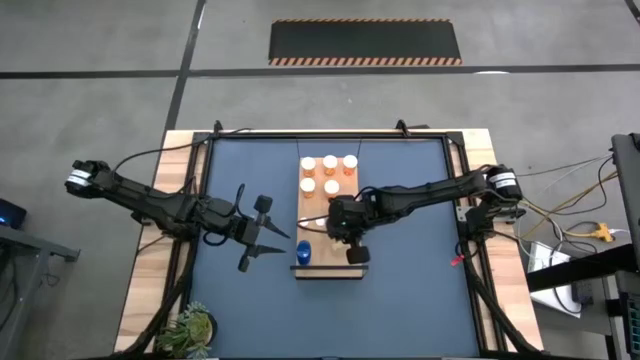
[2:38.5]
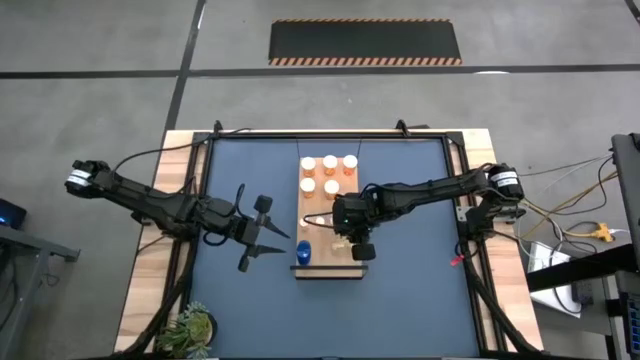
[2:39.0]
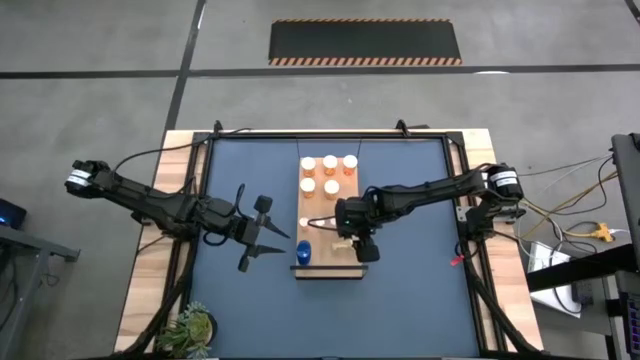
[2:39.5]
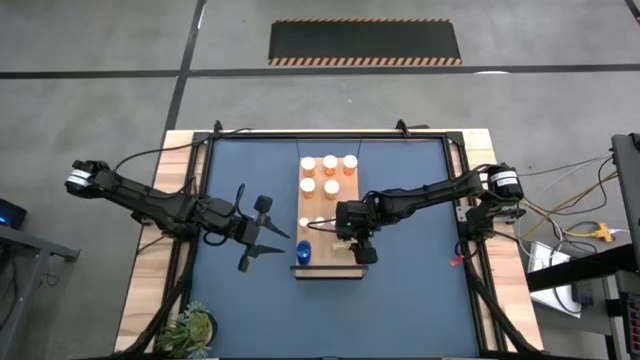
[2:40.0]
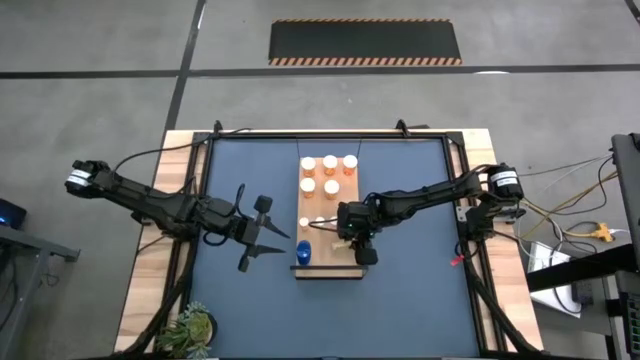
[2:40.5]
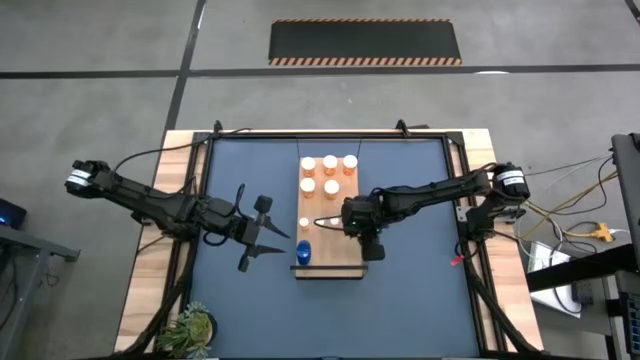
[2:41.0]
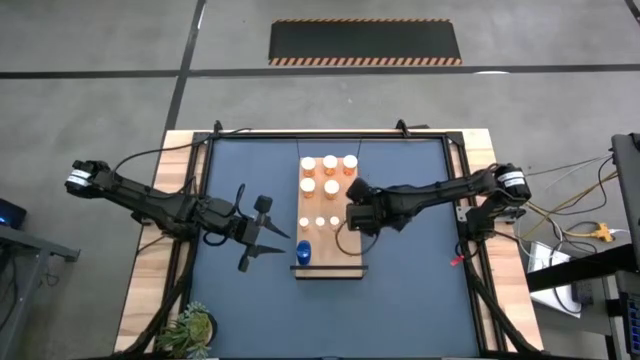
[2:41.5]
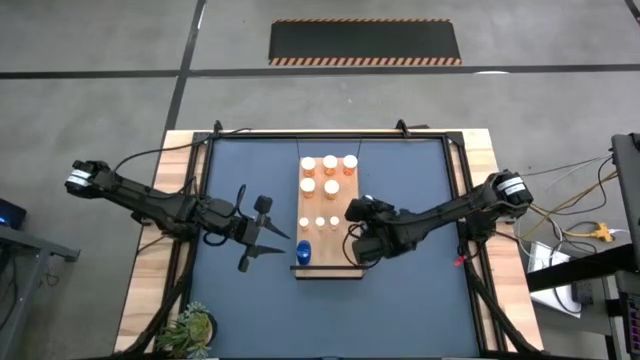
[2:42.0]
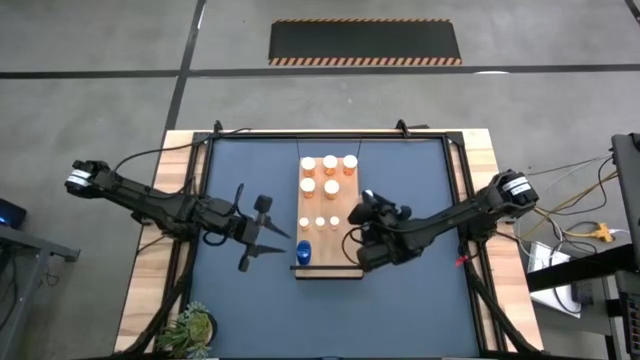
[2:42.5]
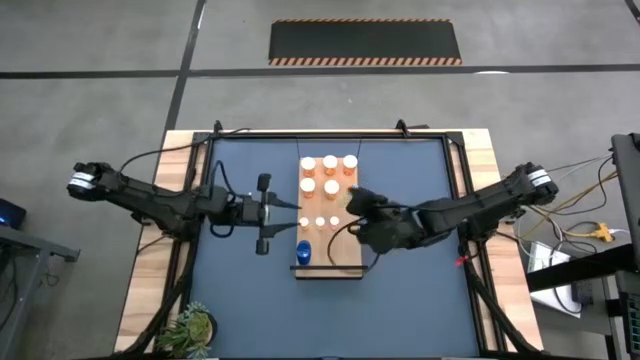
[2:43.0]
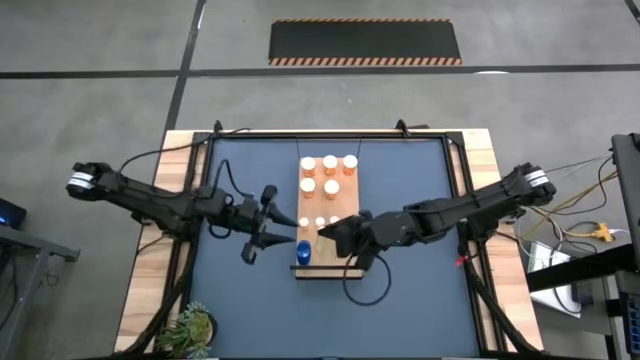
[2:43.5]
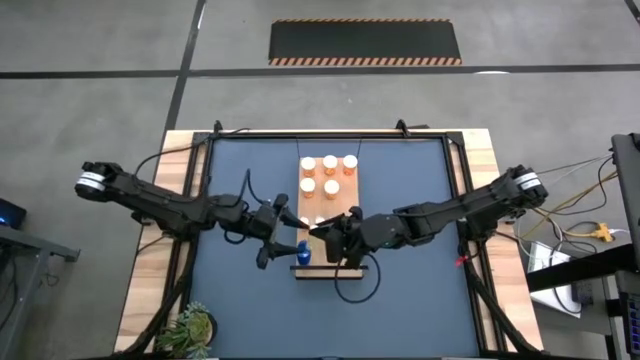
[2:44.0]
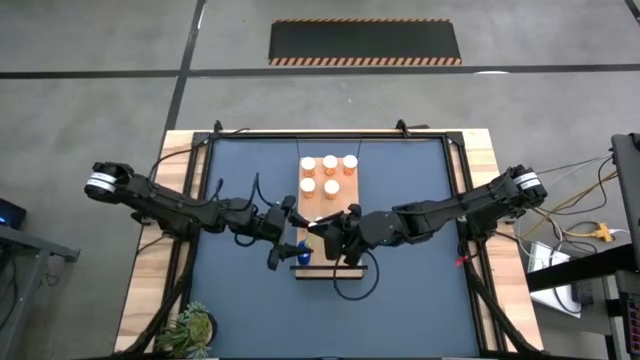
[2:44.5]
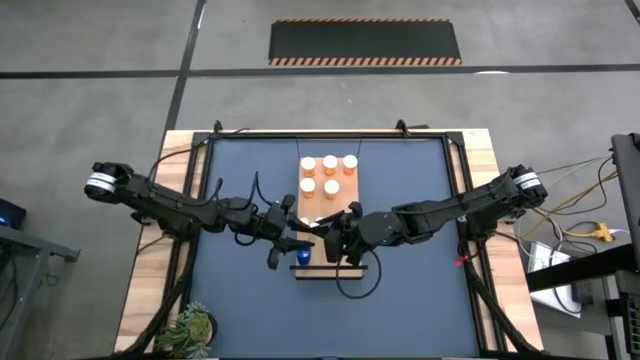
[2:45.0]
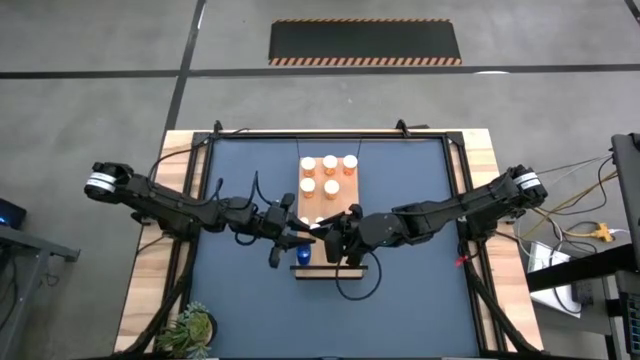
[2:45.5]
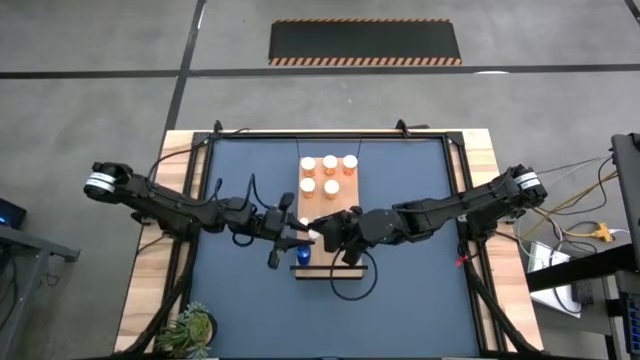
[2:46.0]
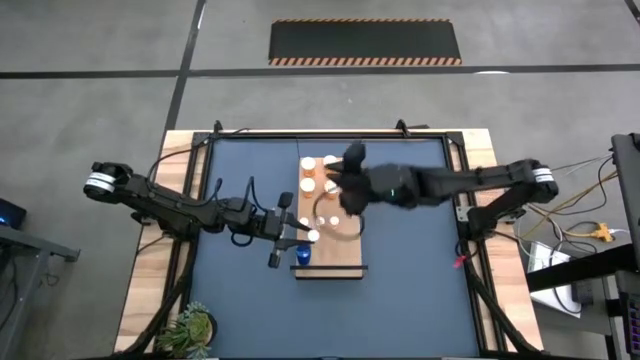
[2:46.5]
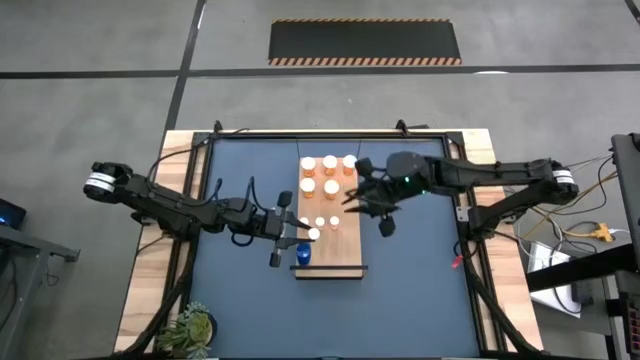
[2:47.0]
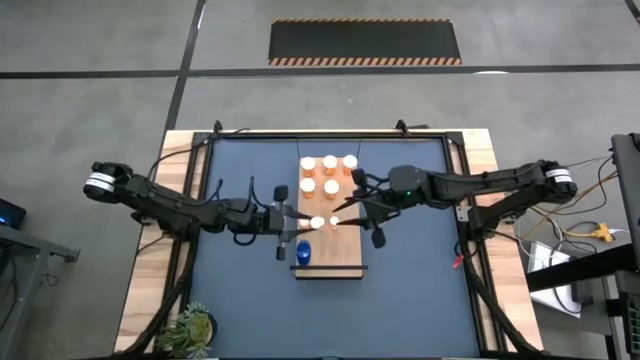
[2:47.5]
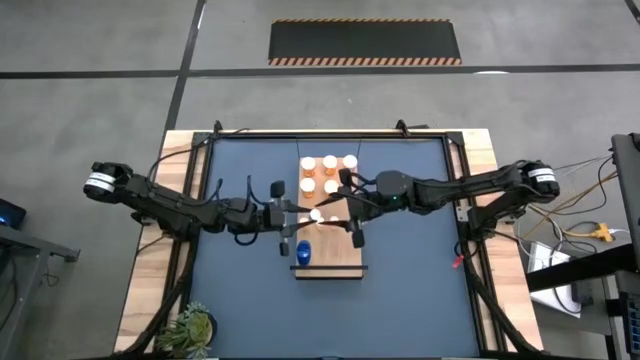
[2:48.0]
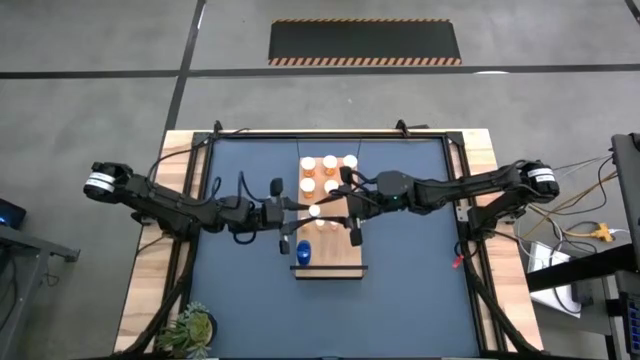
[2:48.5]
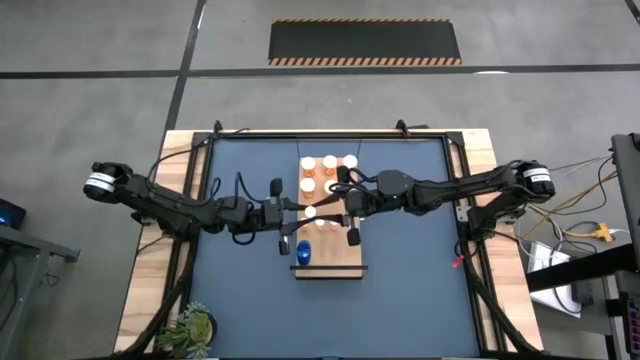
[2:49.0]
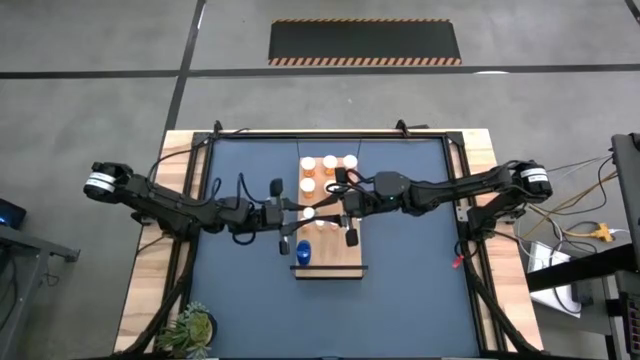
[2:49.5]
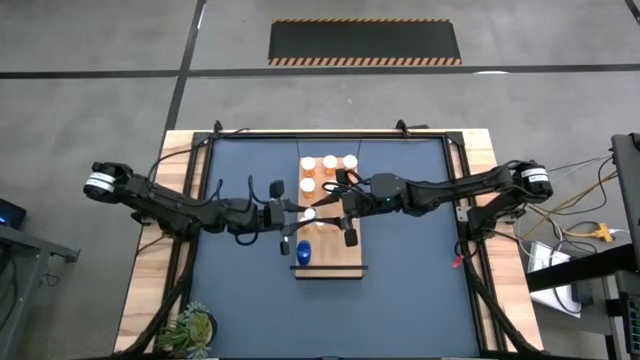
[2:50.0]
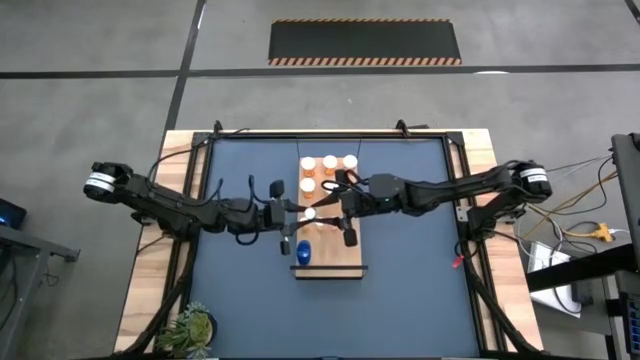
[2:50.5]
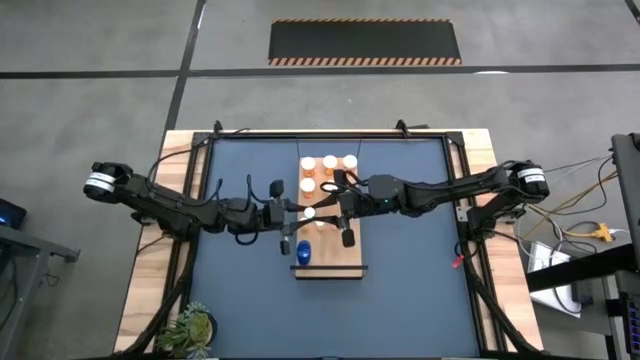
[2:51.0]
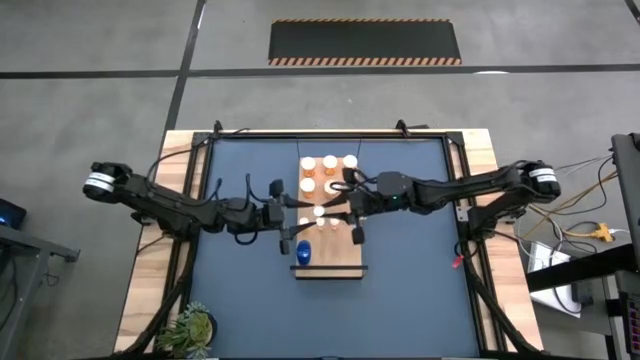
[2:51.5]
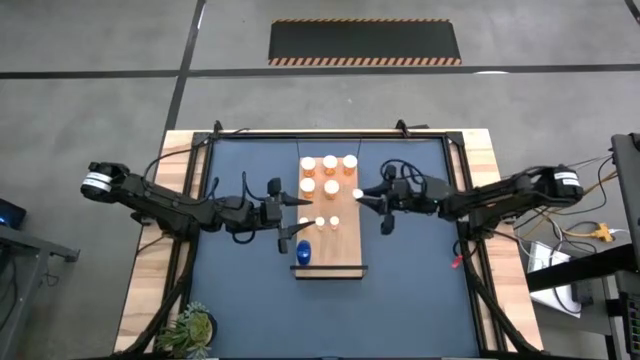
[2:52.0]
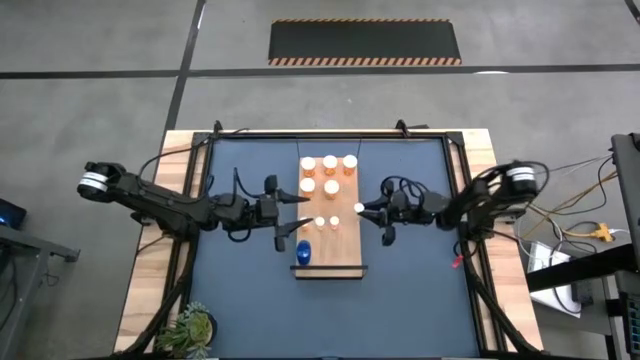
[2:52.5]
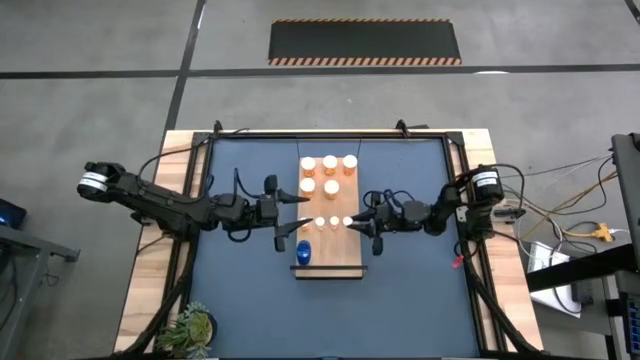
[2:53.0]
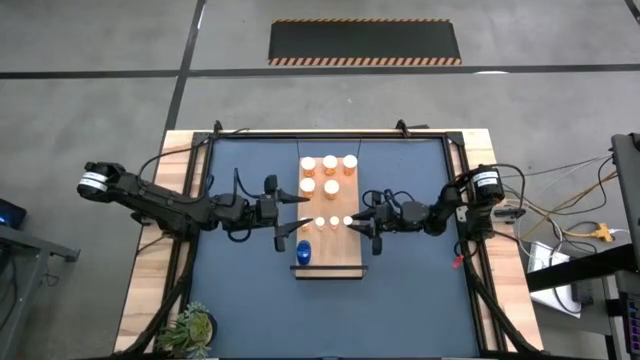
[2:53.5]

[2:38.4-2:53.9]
Task: Pick and place medicine bottles onto shelf by color
Put the small yellow pill bottle on the shelf

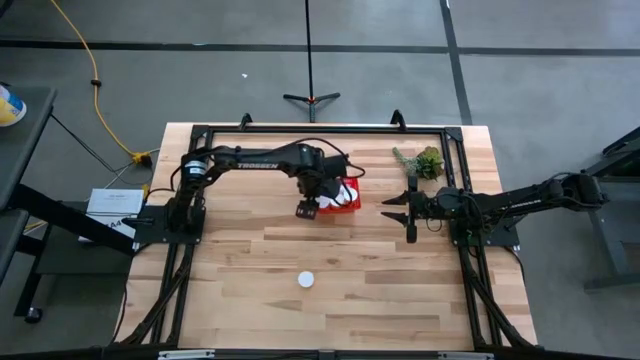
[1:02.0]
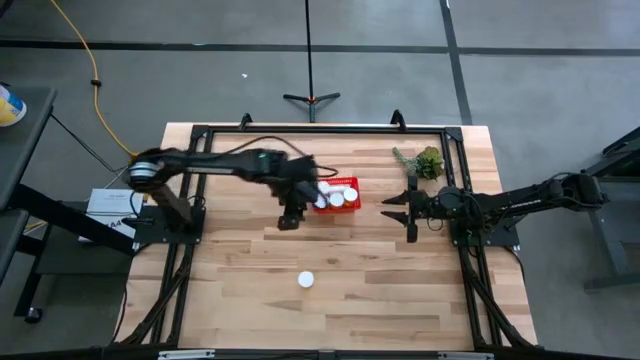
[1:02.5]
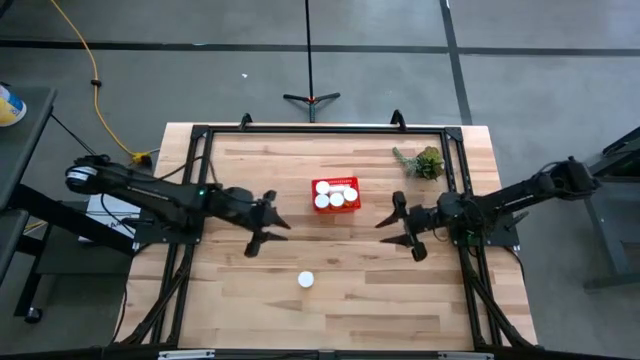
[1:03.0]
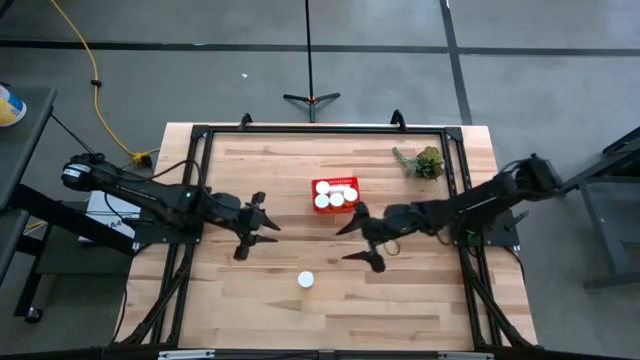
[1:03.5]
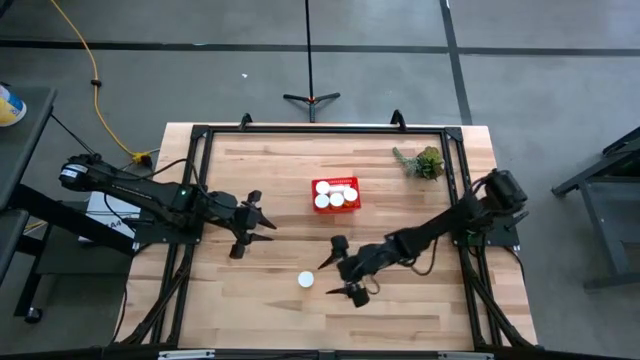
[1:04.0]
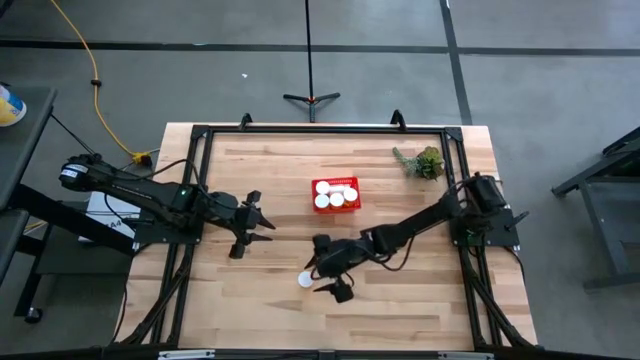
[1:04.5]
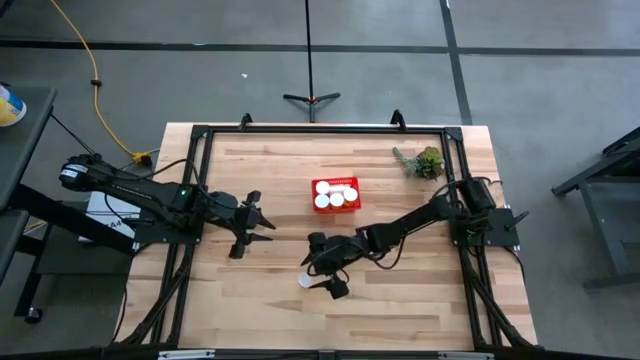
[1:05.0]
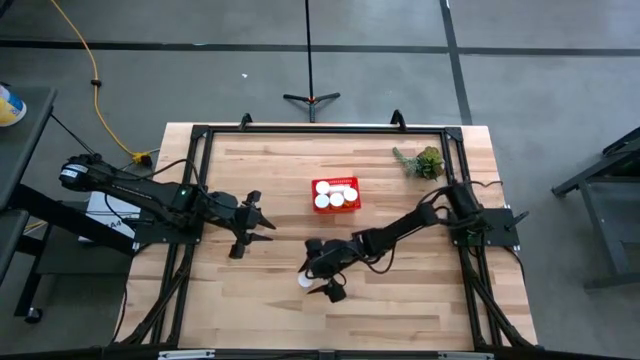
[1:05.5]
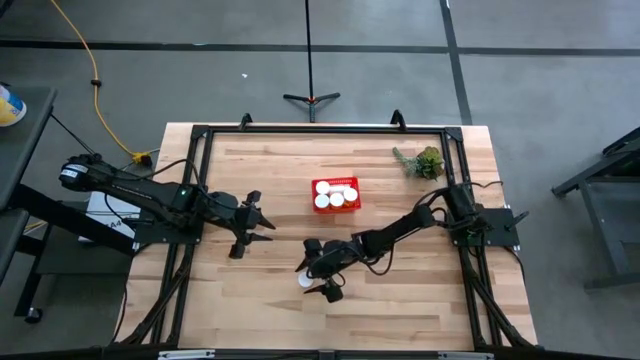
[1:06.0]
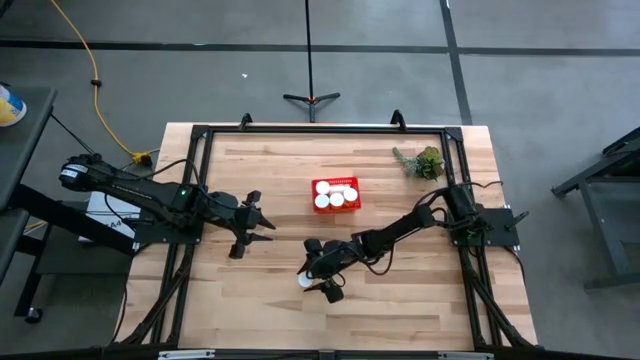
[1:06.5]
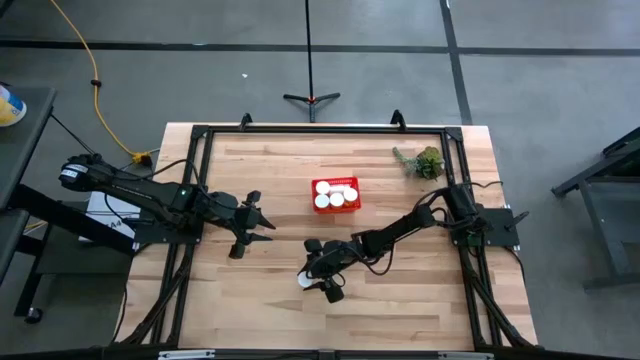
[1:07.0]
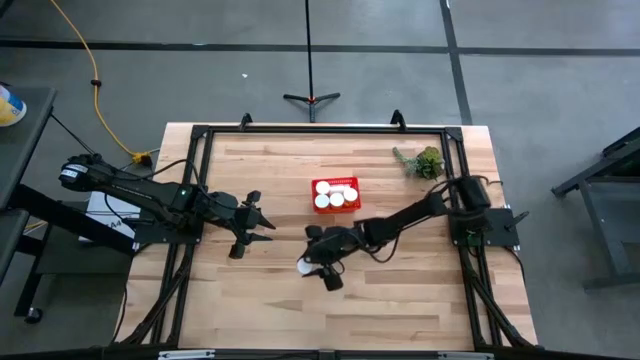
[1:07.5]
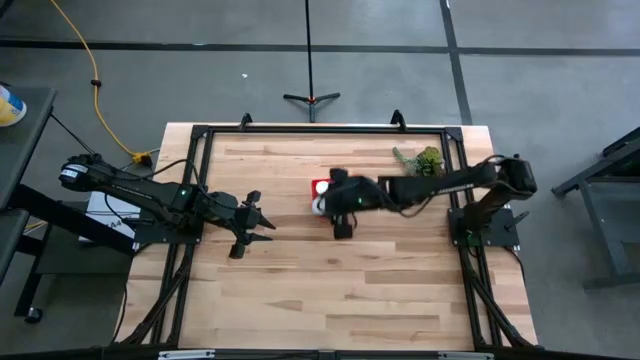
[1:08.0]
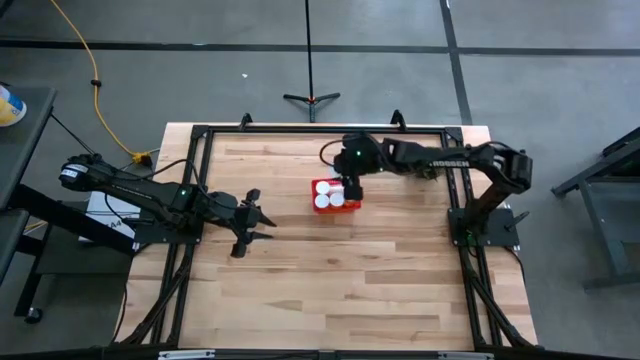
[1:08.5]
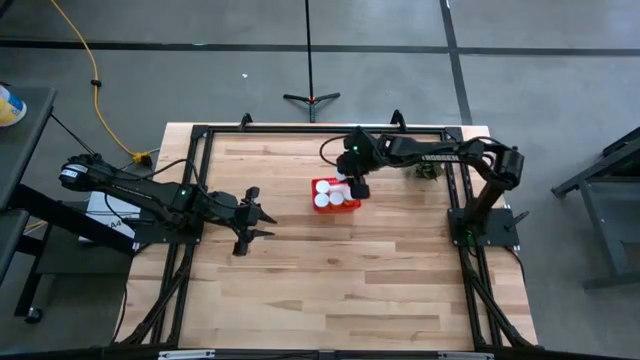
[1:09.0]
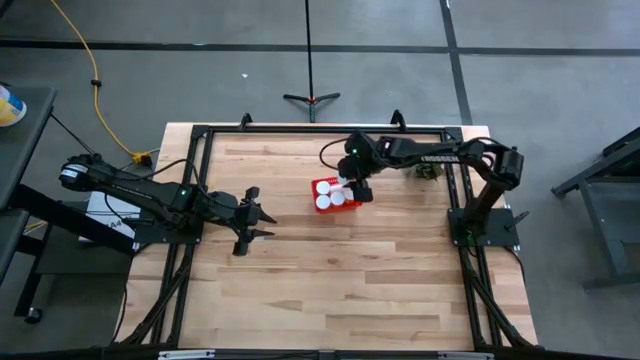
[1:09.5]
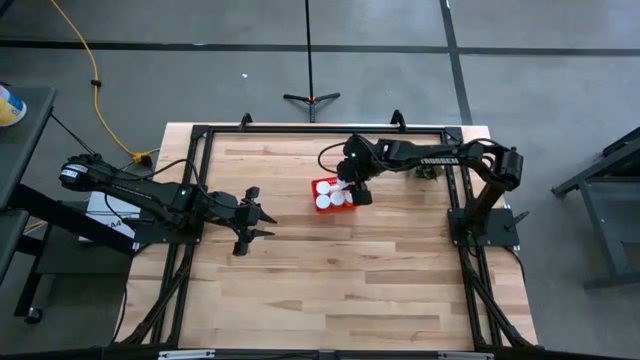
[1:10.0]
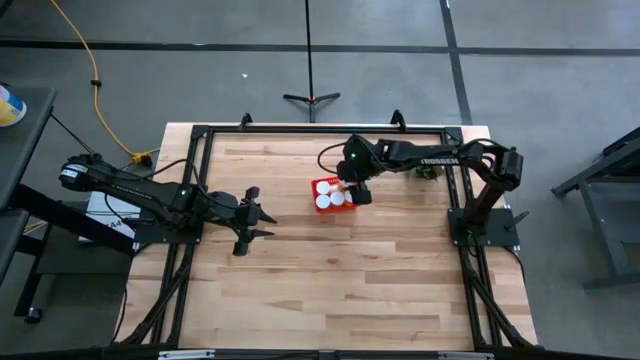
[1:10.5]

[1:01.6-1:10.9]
Task: Pick and place pill bottles into a basket
Put the orange pill bottle into the red bin
